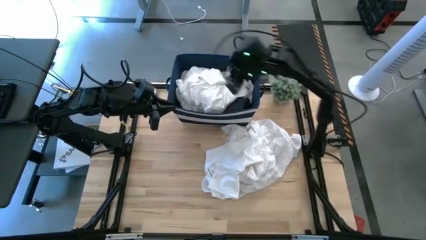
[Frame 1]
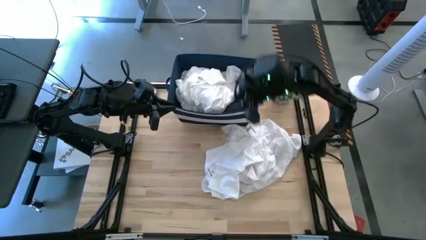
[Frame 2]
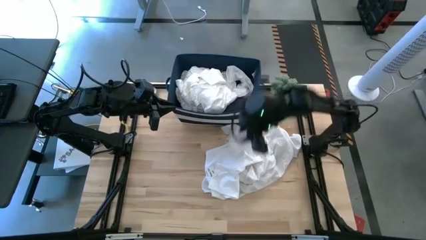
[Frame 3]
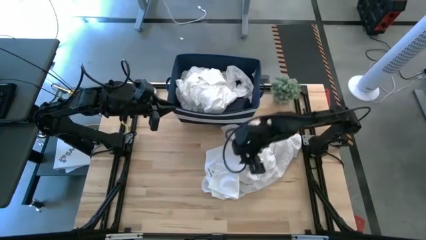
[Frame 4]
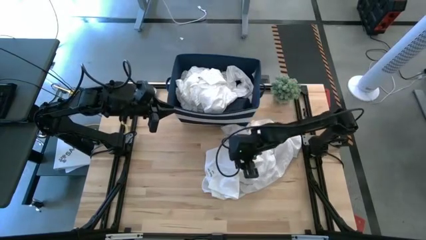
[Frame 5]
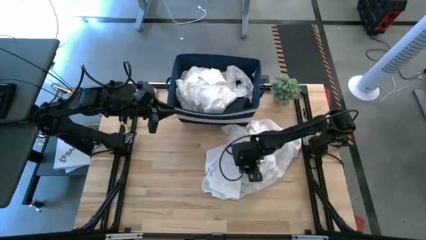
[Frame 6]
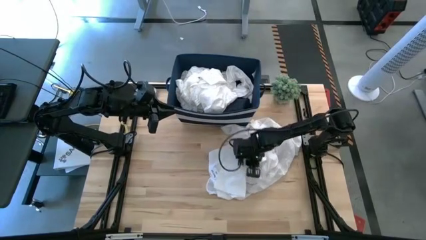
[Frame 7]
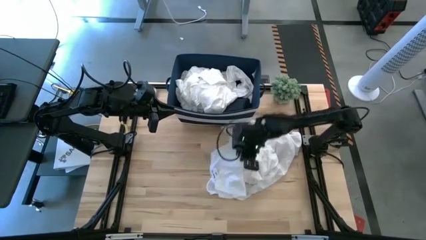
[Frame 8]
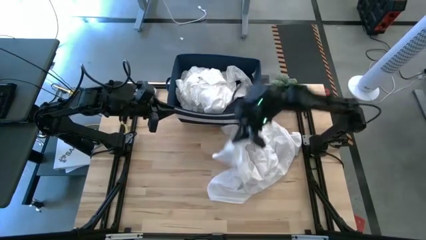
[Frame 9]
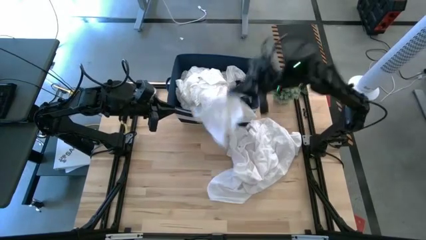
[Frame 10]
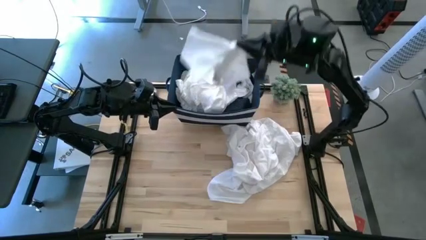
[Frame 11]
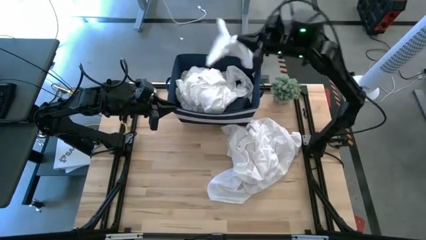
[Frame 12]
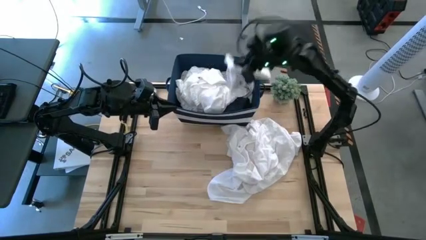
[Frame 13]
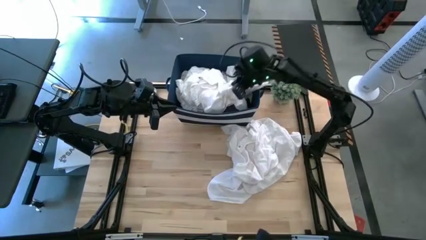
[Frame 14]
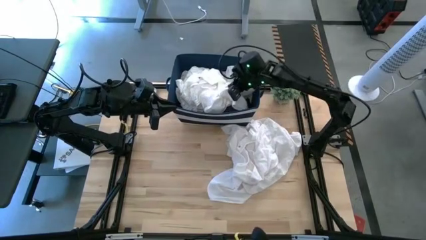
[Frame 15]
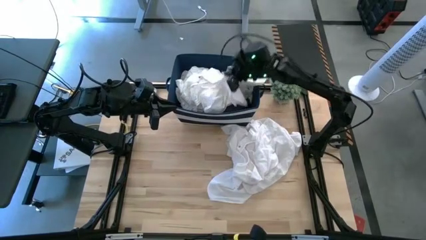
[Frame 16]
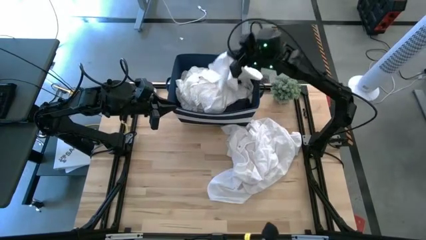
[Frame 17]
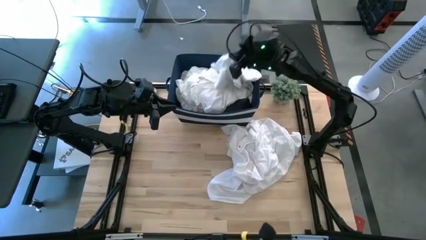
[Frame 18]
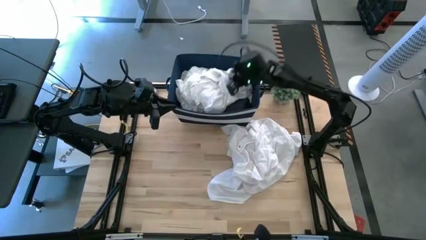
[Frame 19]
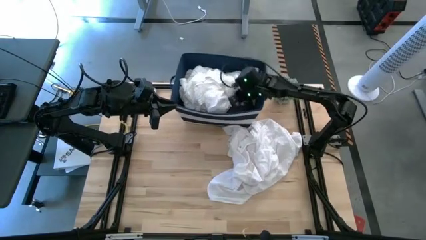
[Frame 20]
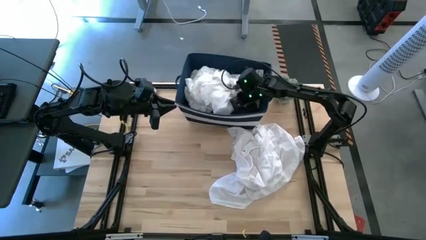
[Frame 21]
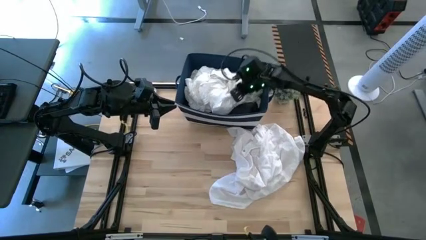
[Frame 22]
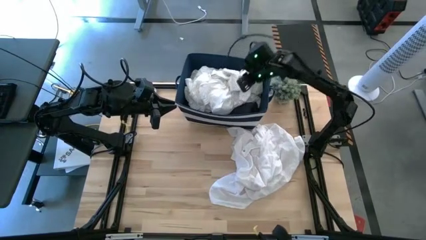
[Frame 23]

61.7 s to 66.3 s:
Task: Sort clothes
Put the white underwear into the blue bin

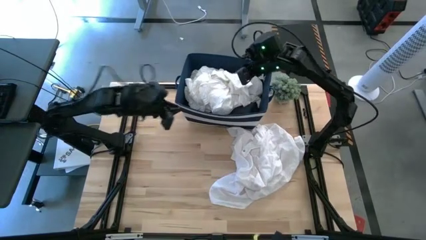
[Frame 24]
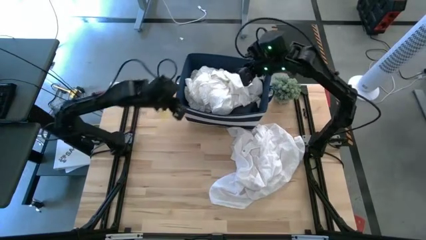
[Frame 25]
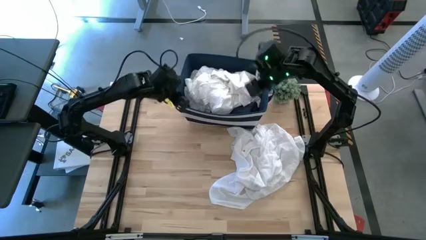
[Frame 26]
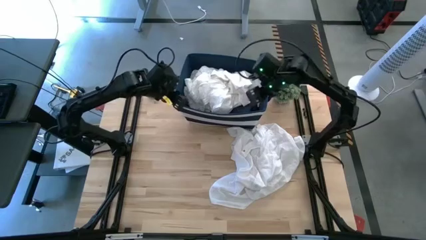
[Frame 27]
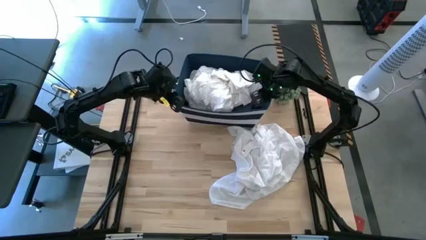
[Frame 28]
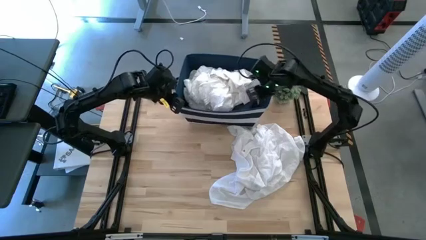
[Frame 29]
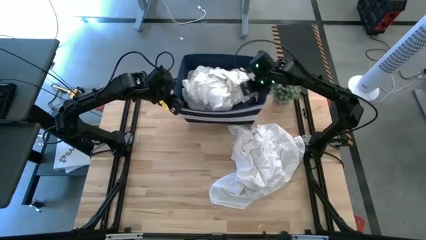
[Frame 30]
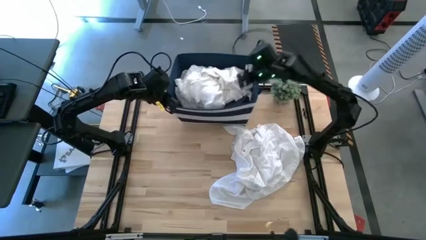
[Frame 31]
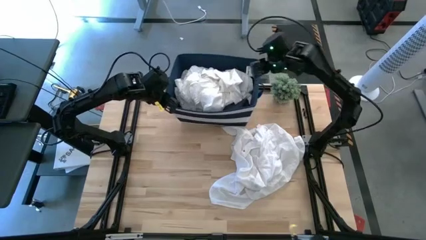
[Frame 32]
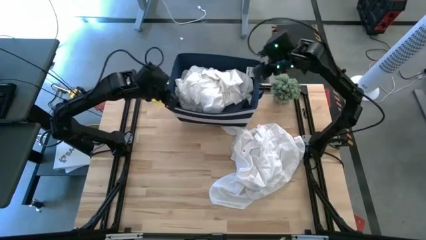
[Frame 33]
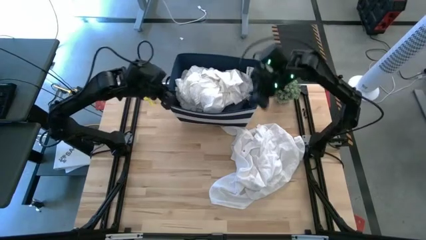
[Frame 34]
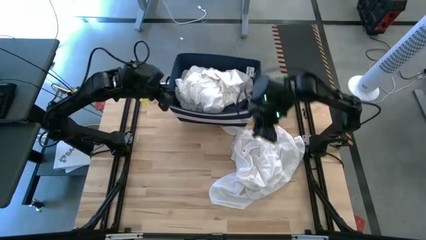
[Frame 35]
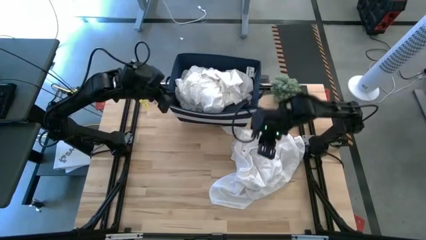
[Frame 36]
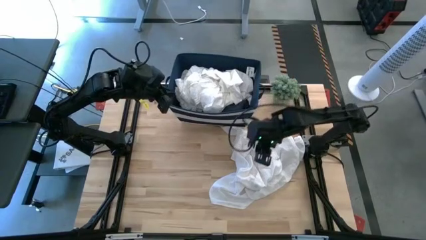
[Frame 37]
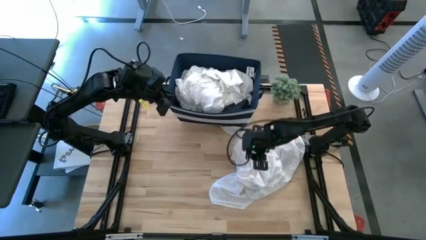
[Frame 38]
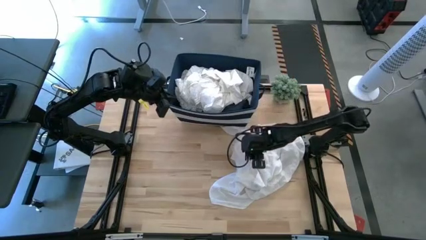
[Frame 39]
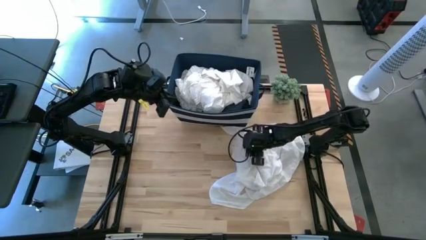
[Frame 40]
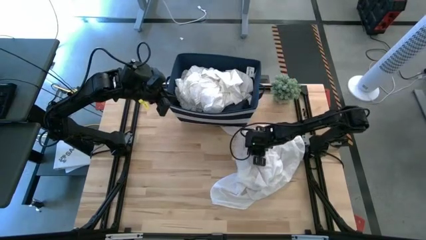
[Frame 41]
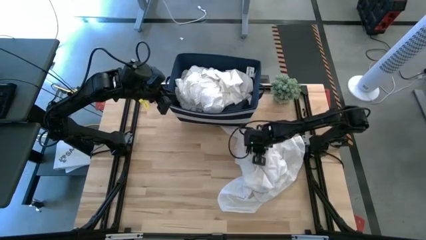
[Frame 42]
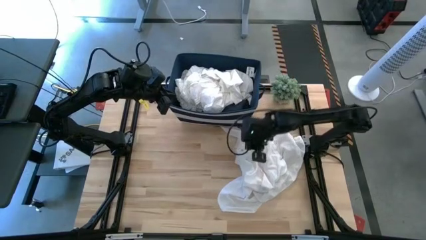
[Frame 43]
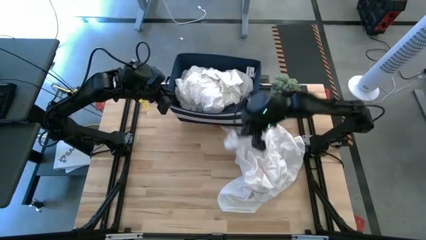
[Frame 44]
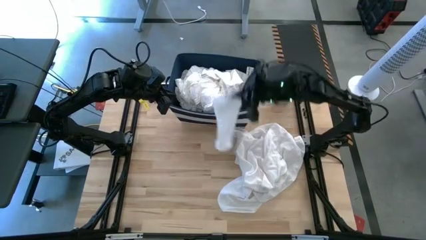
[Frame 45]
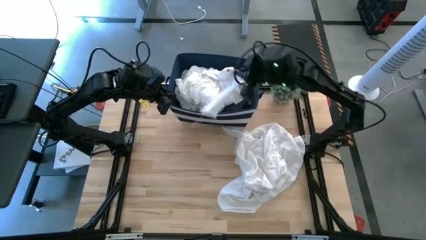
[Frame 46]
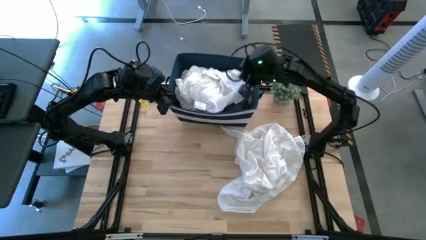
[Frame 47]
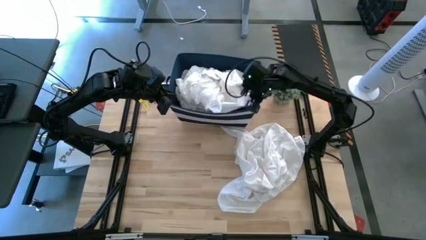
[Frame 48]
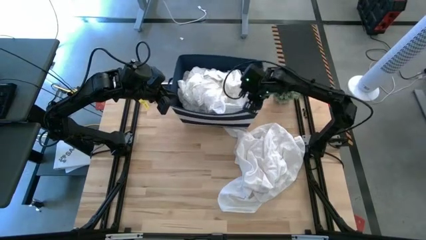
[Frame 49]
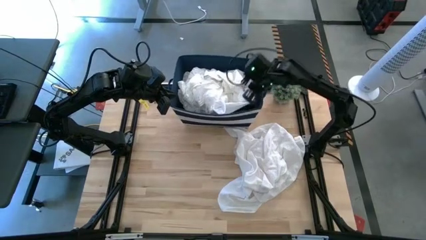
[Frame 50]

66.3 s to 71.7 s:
Put the white sock into the blue bin

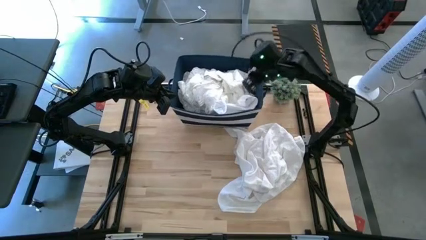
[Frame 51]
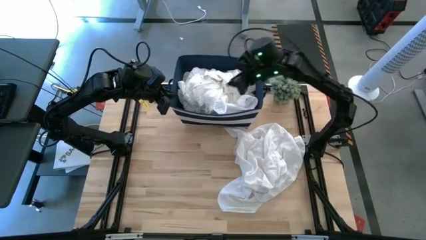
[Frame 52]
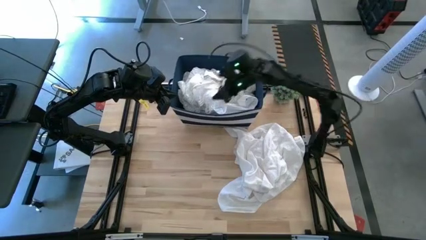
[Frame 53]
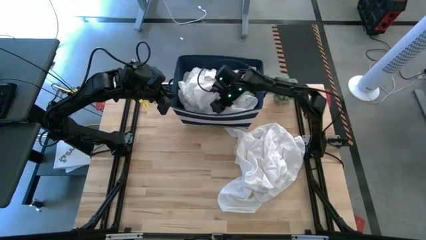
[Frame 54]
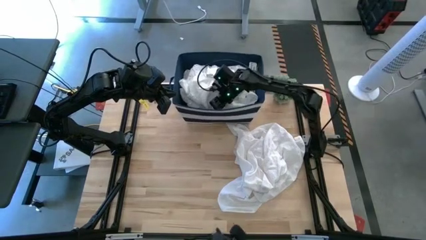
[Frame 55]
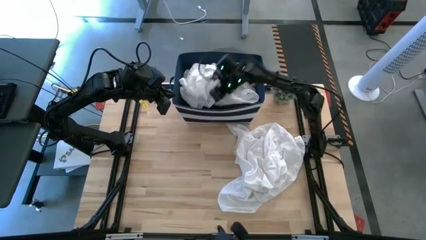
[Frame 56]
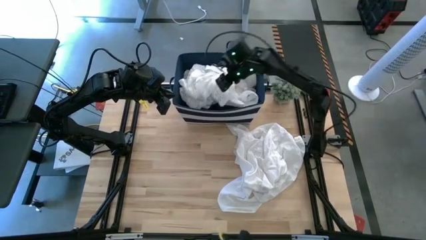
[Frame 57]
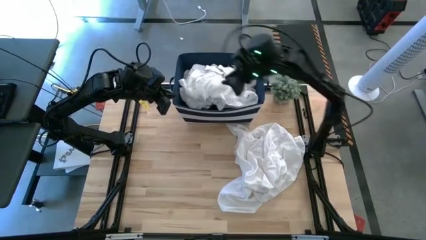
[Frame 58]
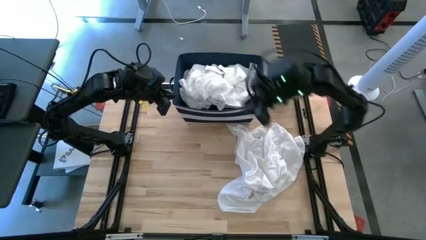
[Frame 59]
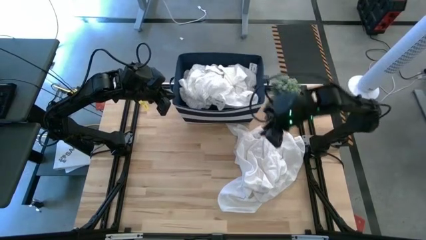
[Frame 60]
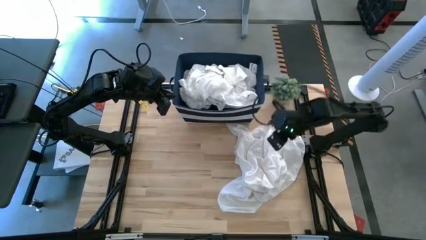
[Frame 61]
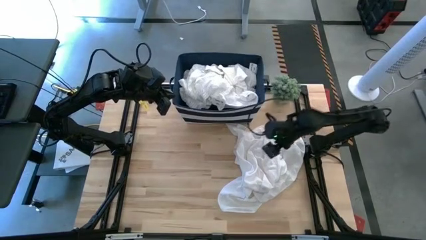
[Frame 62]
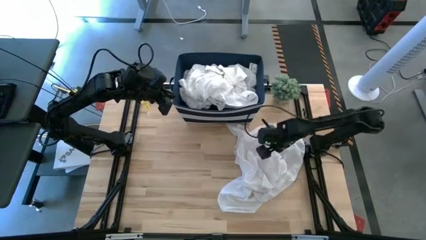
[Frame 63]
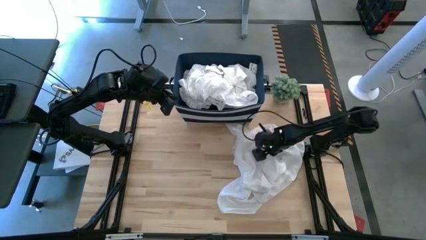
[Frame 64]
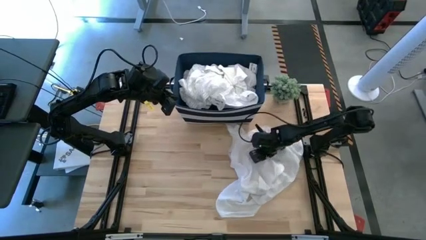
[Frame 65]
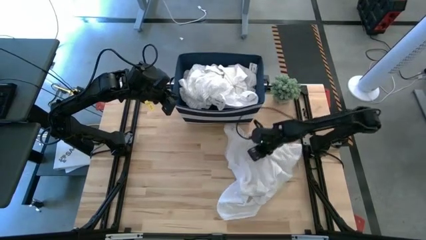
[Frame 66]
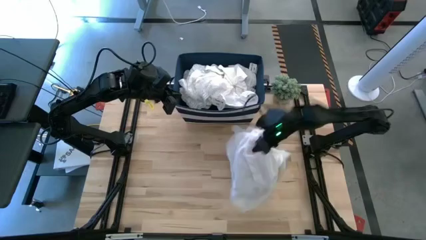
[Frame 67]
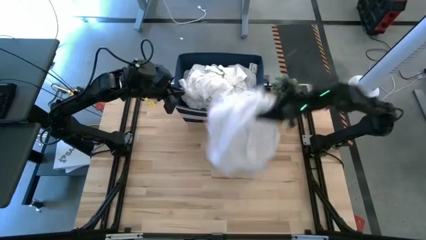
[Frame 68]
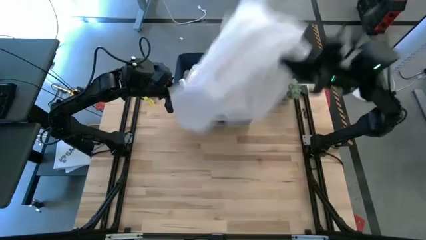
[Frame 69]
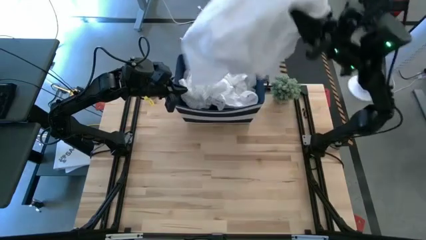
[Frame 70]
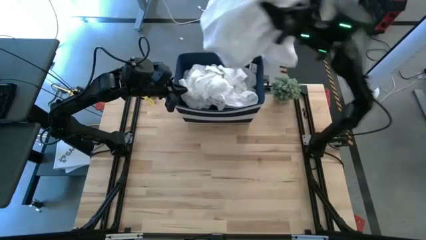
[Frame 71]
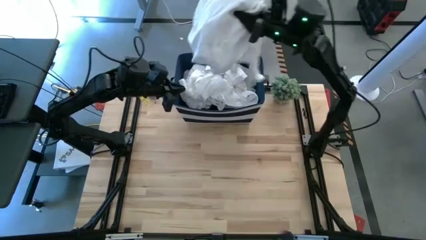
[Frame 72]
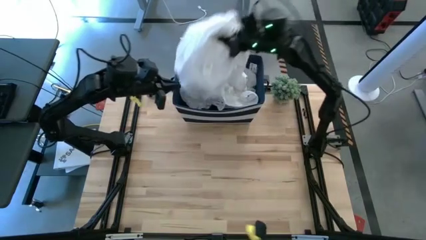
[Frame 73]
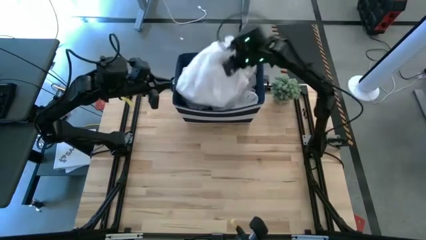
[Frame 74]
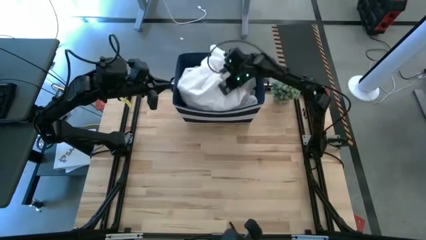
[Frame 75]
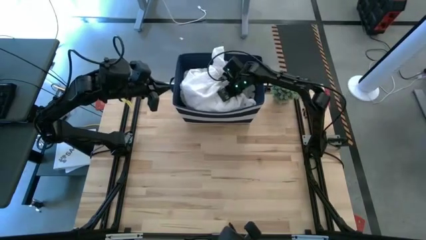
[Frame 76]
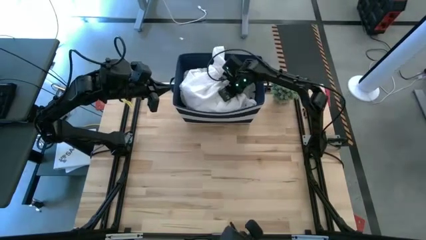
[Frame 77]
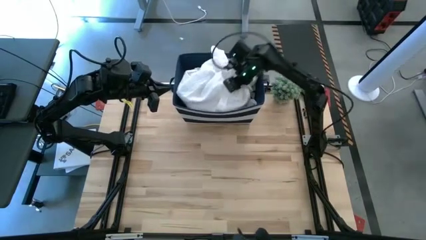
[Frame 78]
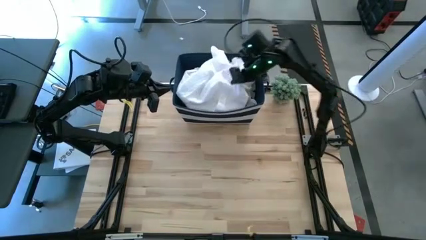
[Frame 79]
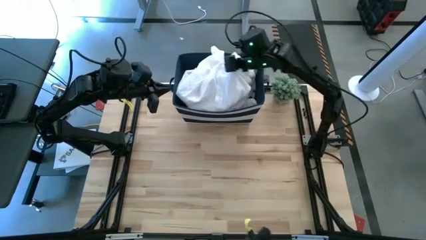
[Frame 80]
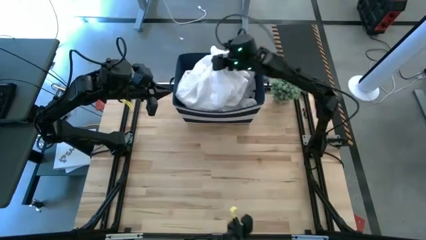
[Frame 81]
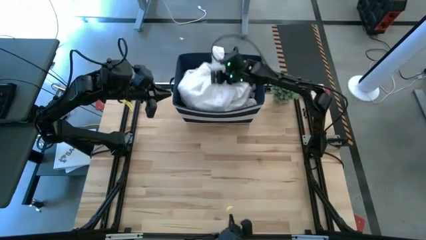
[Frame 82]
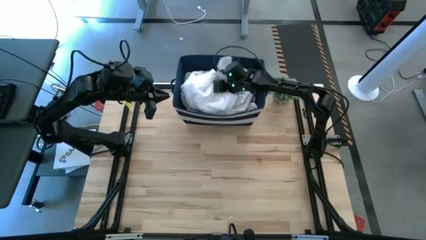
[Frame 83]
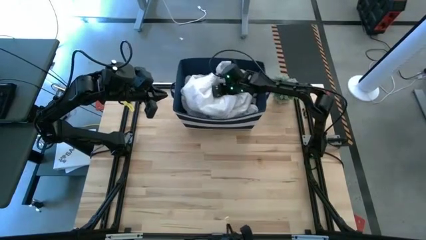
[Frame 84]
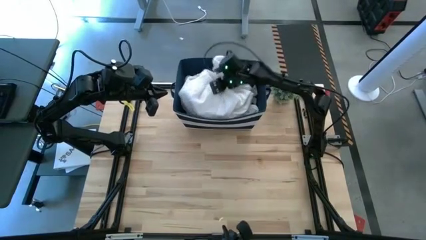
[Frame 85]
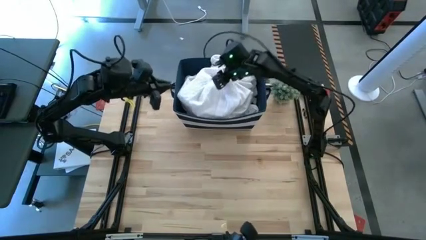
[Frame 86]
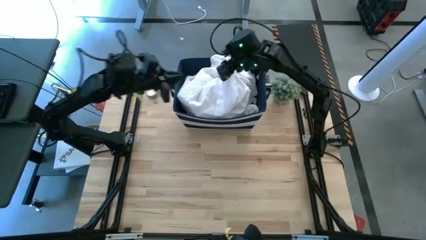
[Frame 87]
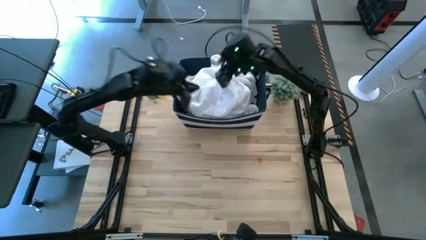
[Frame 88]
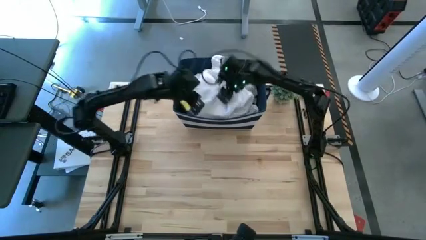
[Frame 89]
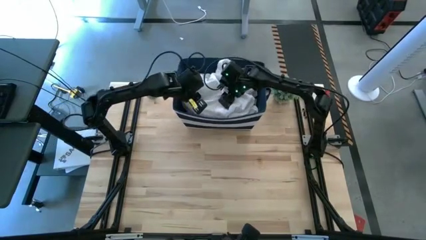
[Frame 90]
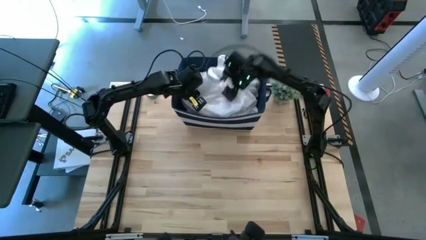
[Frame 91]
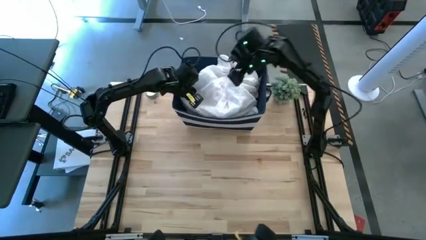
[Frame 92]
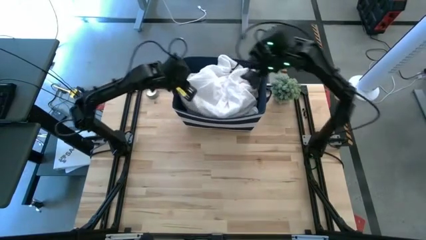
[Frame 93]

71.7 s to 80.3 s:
Put the white shirt into the blue bin
